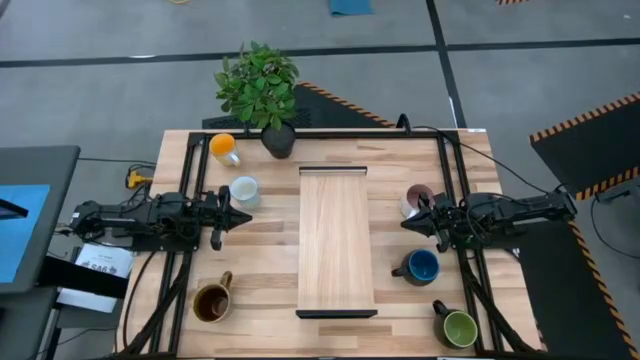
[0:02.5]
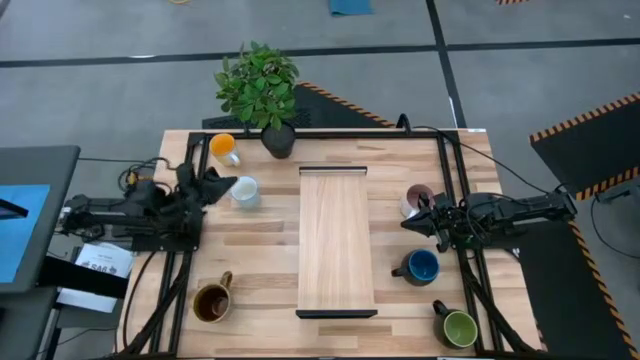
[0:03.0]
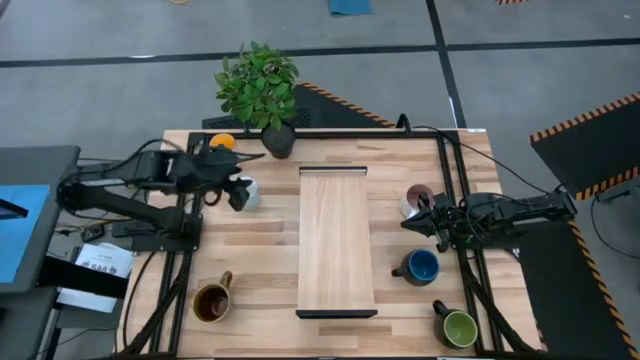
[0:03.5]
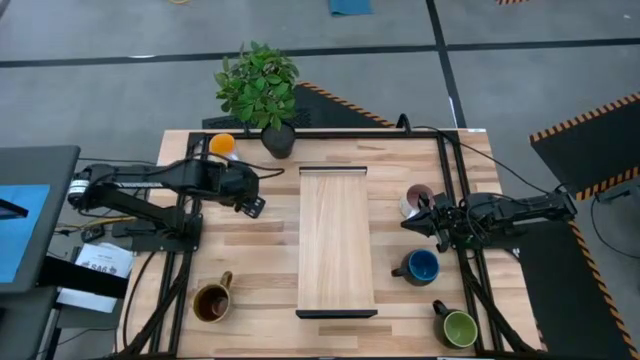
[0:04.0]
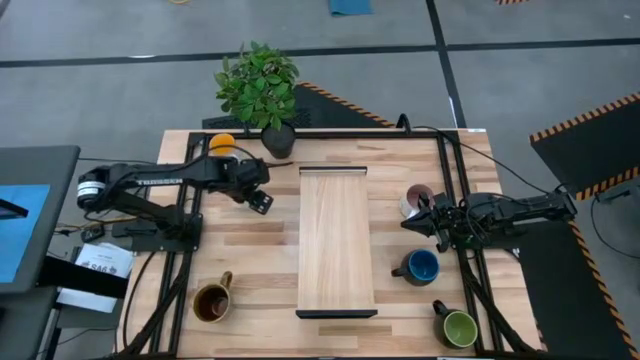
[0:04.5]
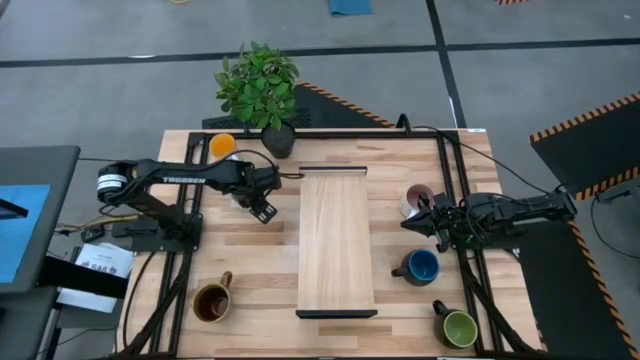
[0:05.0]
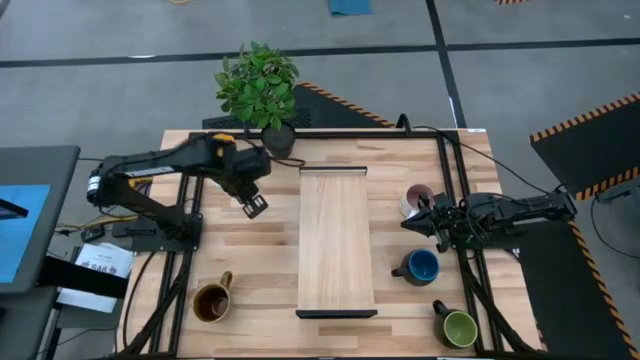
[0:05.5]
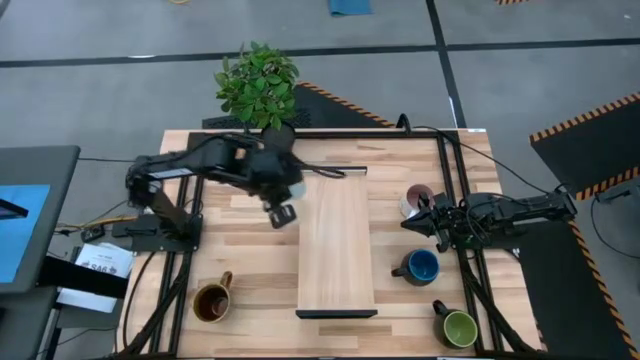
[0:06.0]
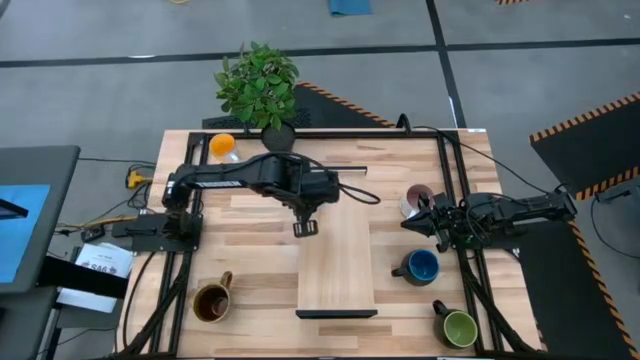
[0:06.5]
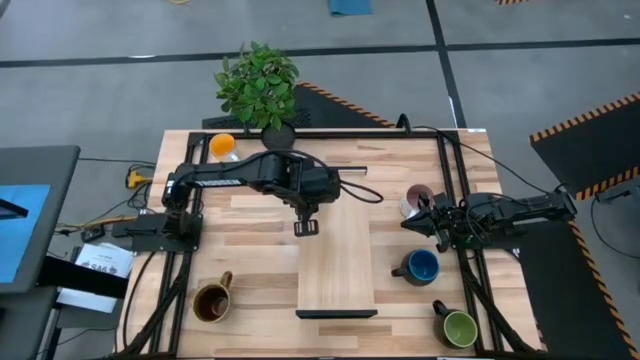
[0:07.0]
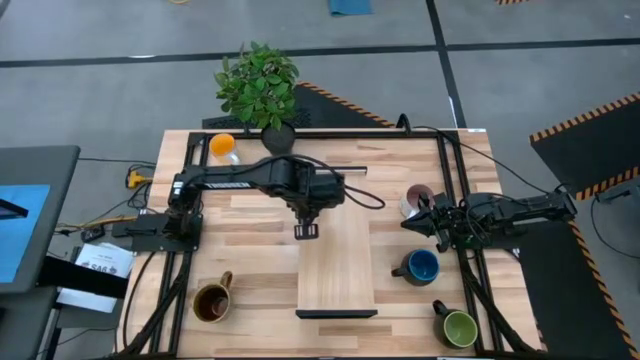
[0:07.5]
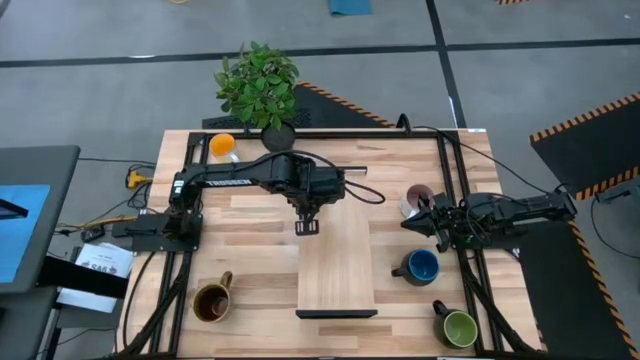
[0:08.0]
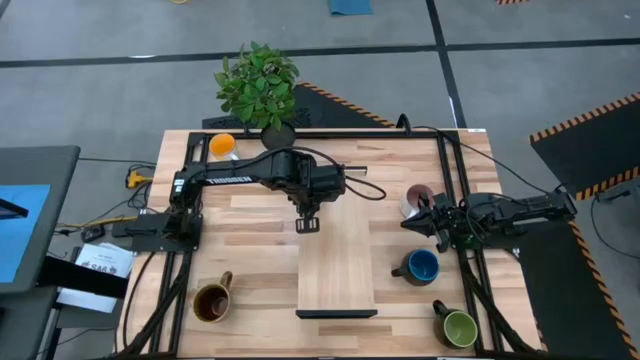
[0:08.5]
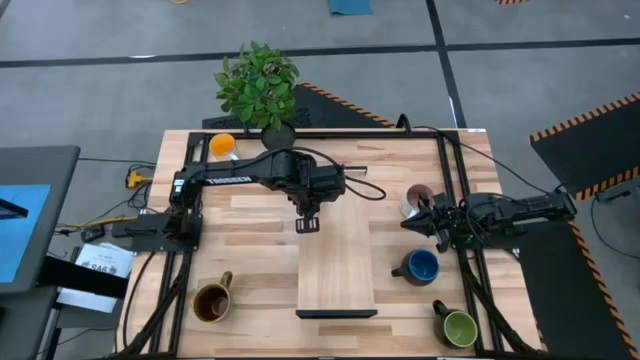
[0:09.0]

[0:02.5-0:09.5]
Task: Place coffee mugs
Put the gray patterned mug on the shelf

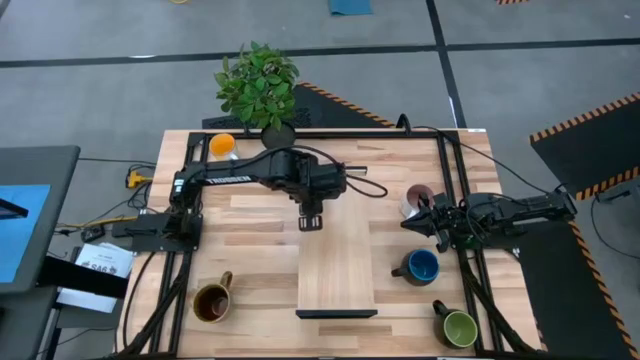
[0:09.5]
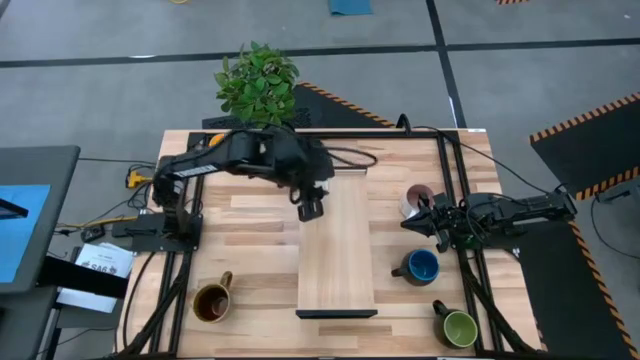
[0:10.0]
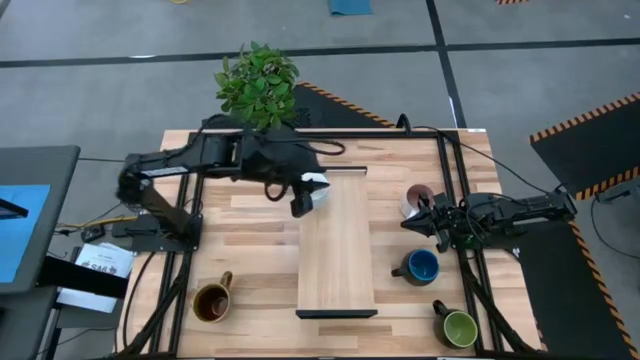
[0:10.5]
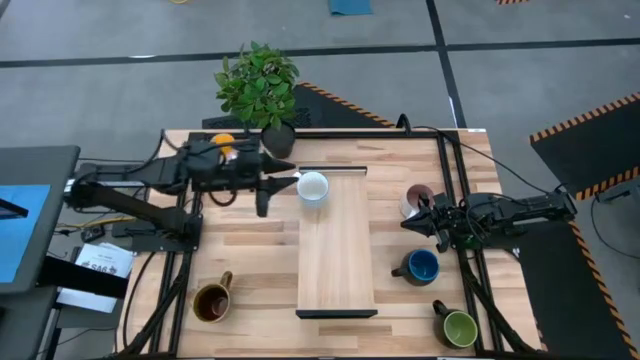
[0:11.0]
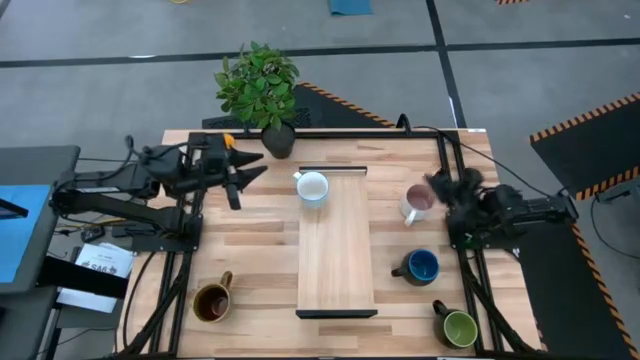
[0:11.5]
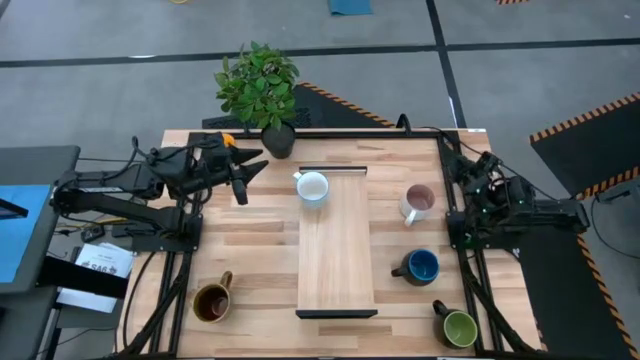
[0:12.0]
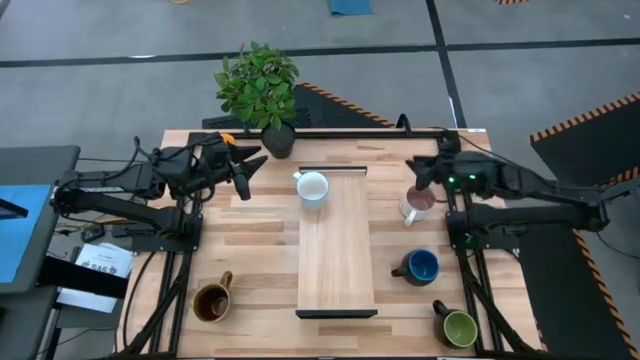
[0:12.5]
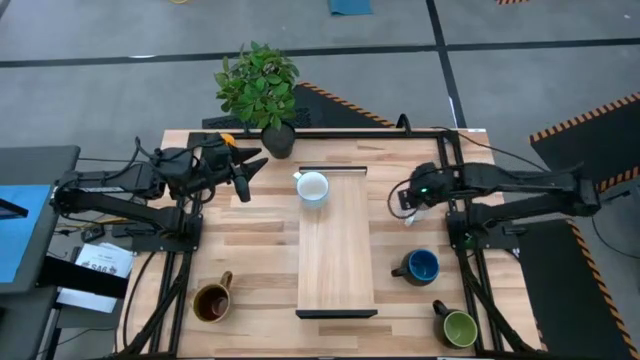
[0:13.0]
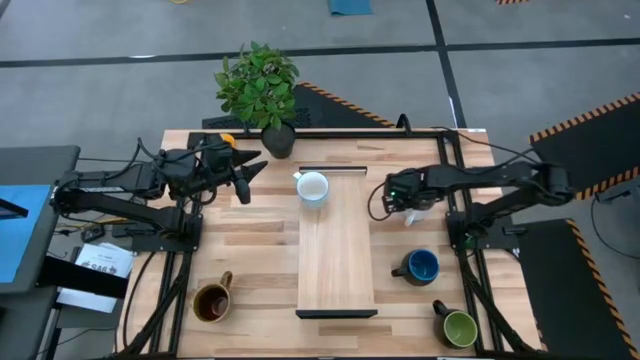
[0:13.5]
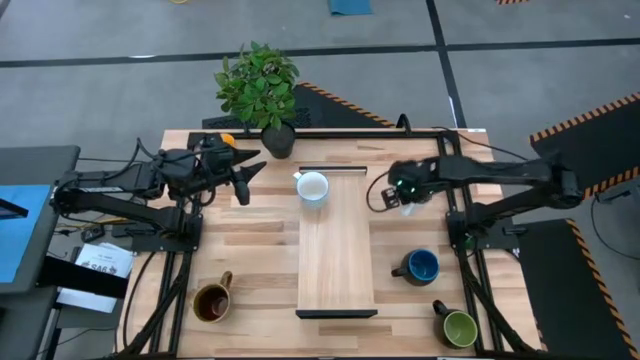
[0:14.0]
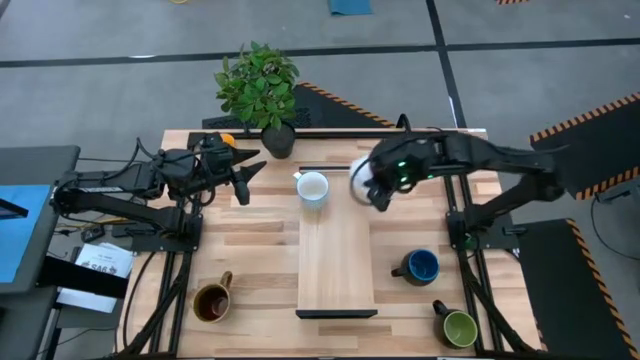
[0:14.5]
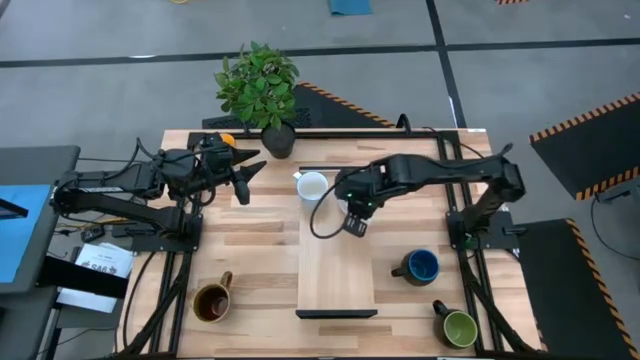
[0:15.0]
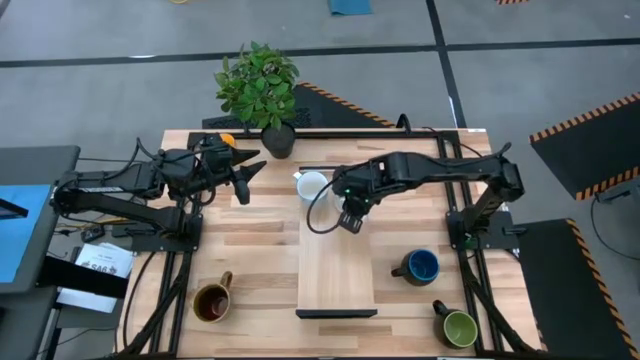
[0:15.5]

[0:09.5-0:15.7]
Put the white mug on the shelf

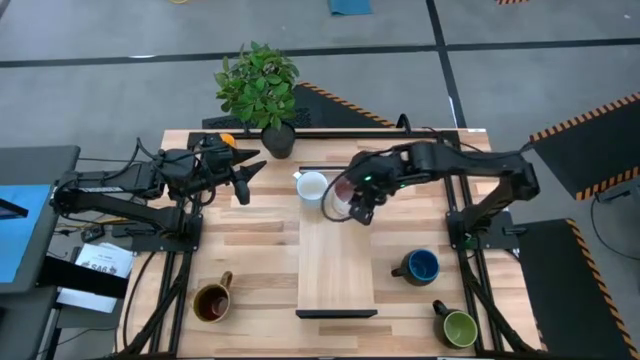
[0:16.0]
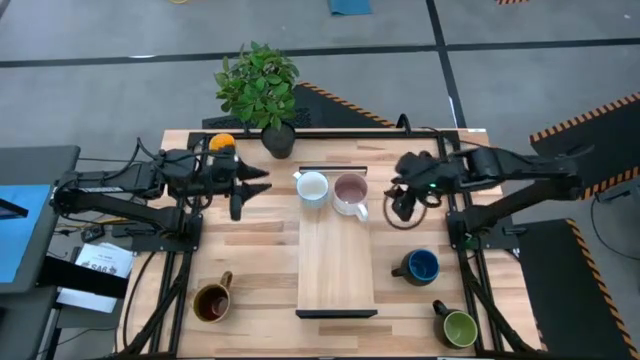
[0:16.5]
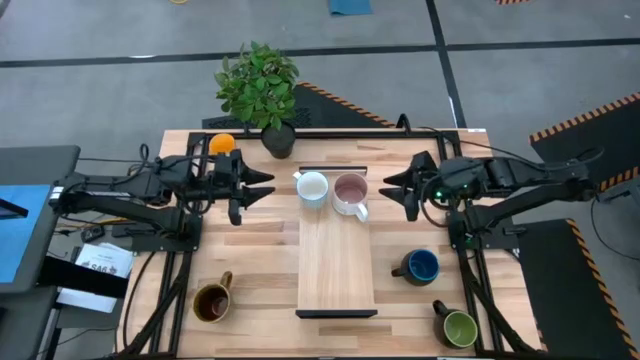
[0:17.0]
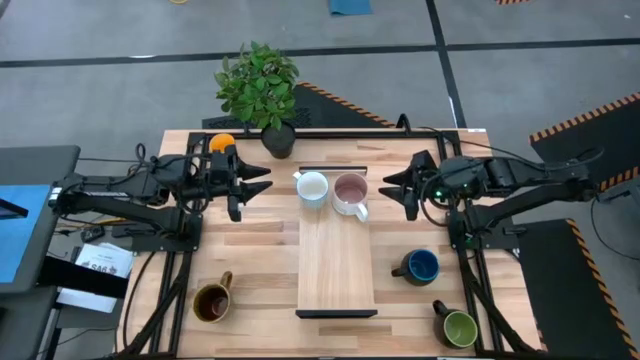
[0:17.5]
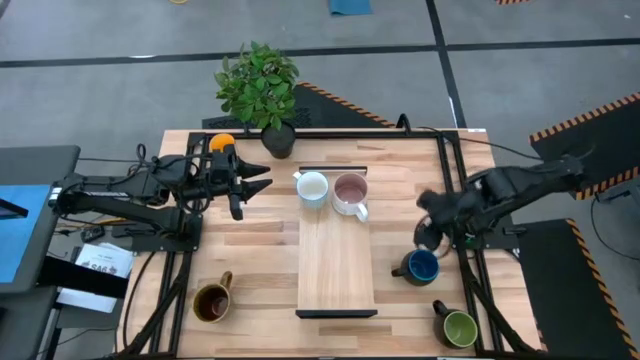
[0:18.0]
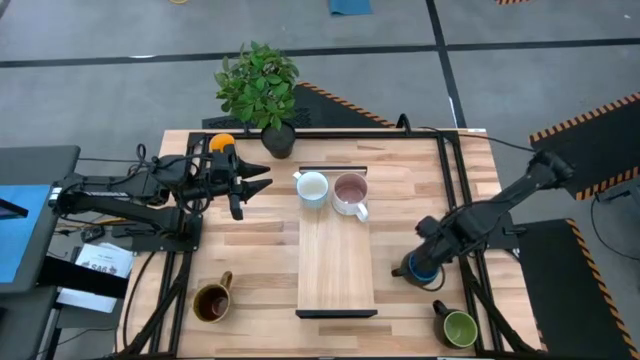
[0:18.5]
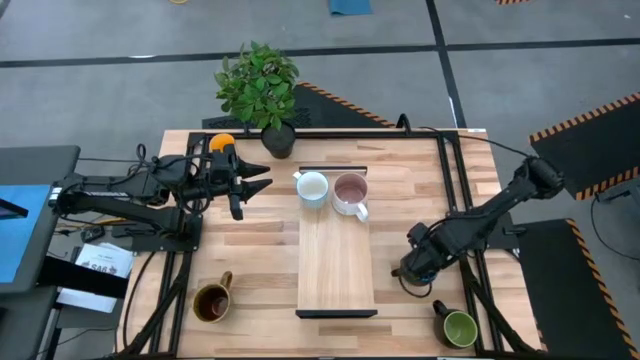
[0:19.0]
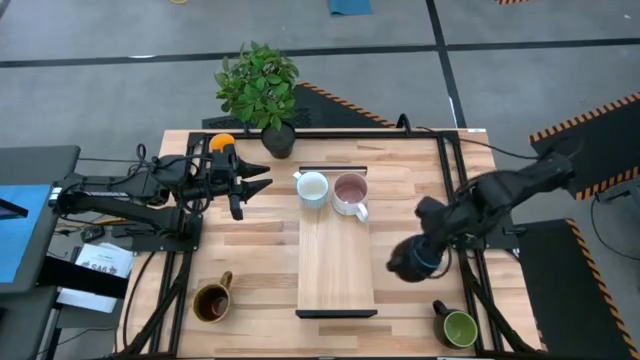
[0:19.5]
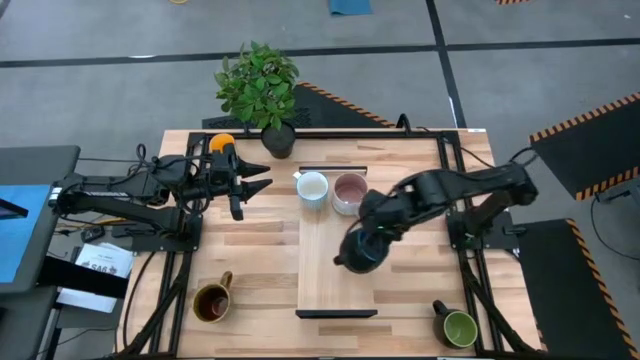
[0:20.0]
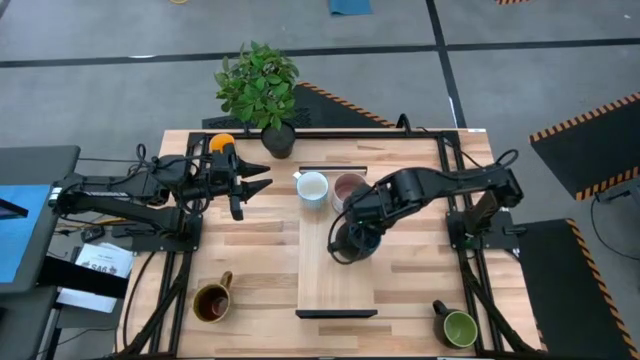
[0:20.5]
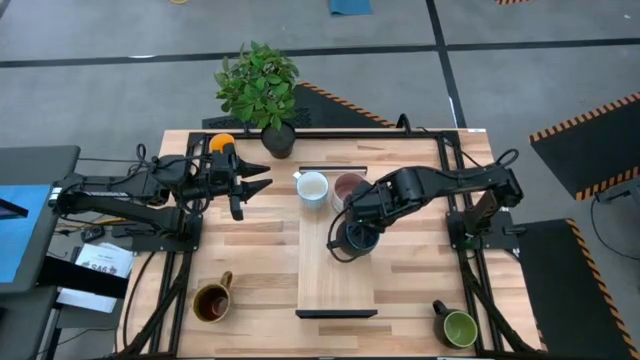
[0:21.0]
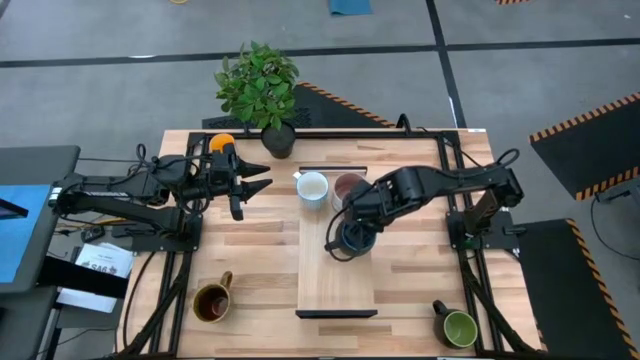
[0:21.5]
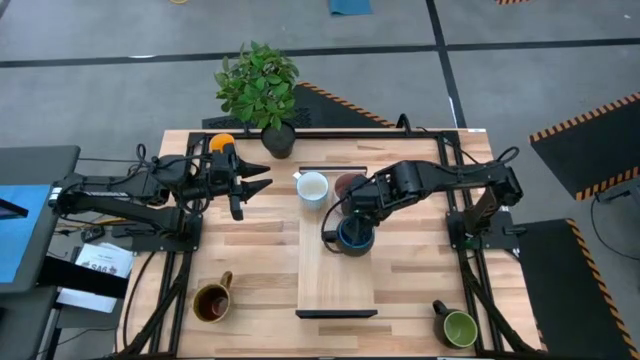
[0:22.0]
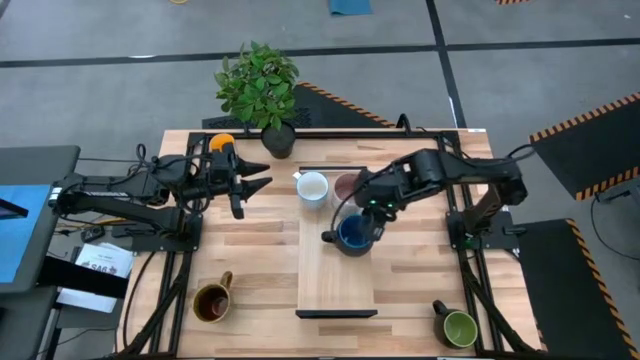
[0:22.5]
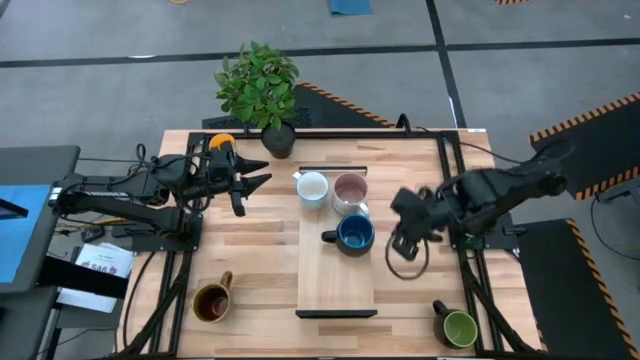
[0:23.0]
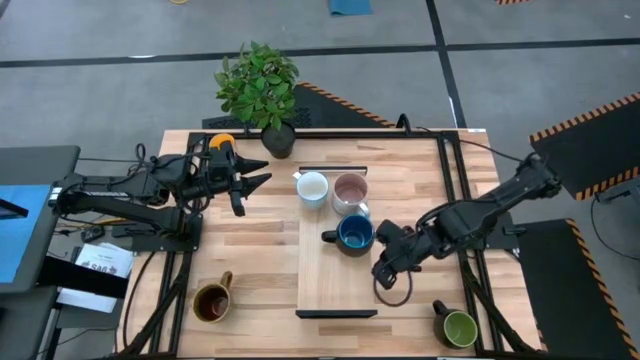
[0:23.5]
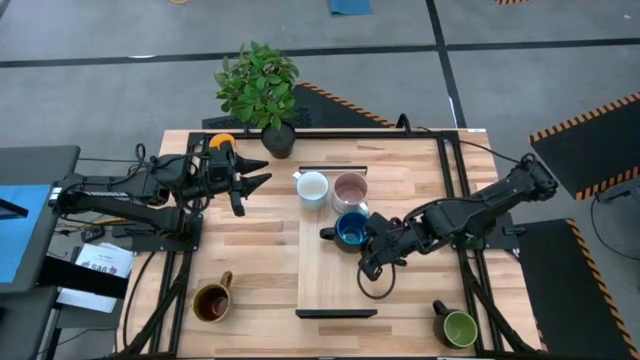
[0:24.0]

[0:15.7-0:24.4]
Put the blue mug on the shelf
